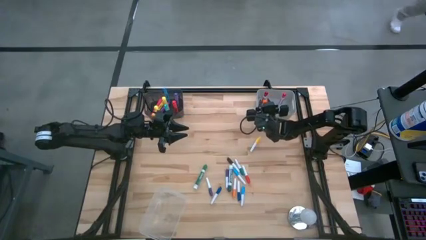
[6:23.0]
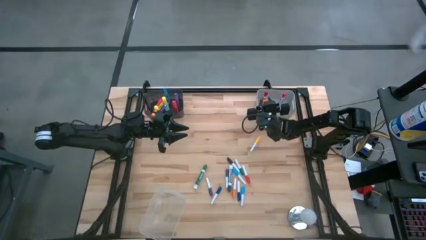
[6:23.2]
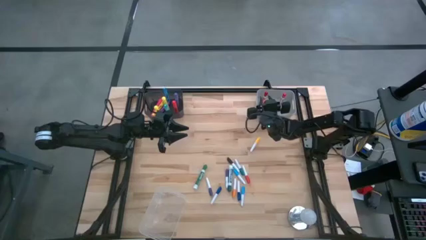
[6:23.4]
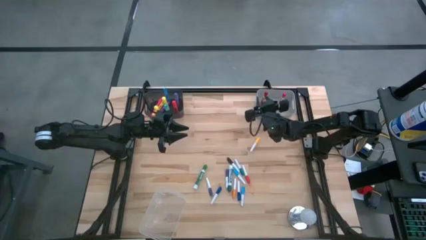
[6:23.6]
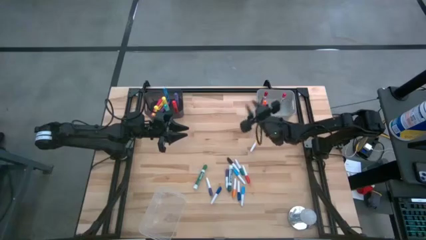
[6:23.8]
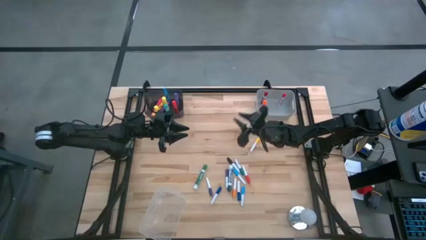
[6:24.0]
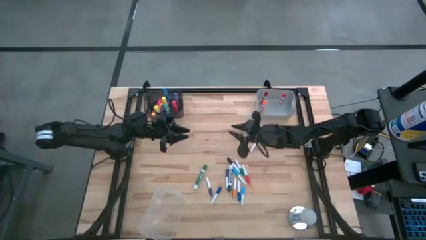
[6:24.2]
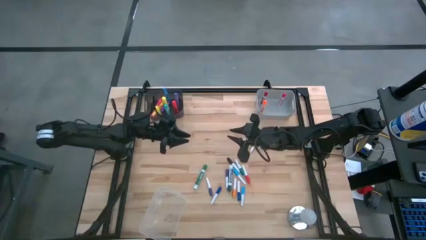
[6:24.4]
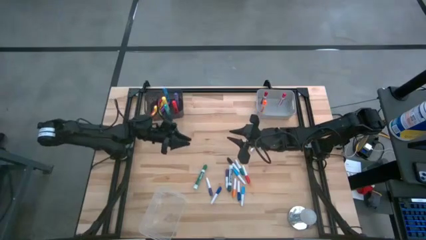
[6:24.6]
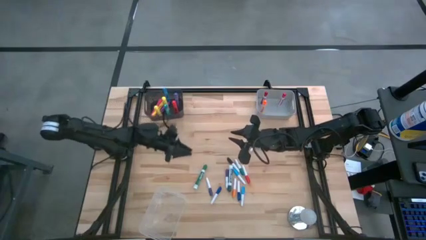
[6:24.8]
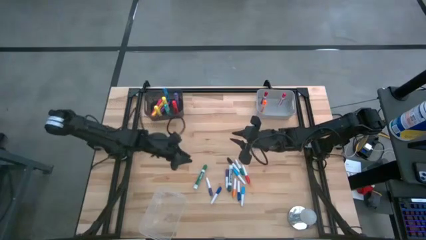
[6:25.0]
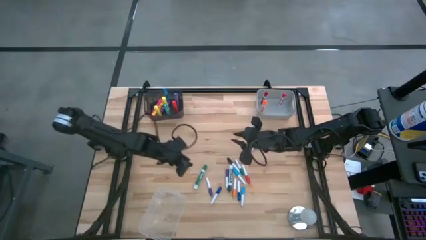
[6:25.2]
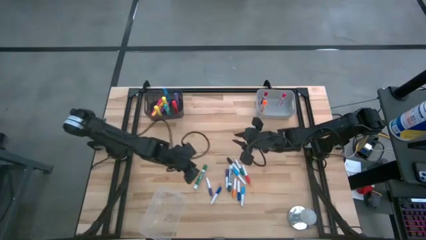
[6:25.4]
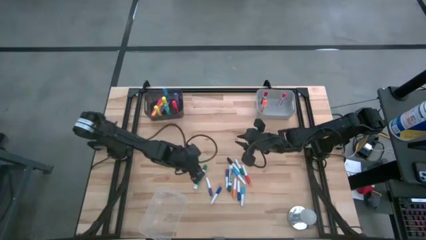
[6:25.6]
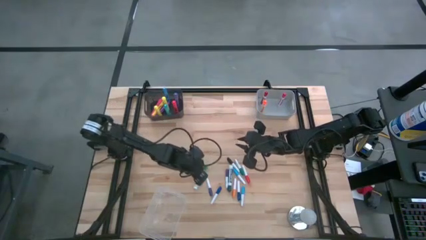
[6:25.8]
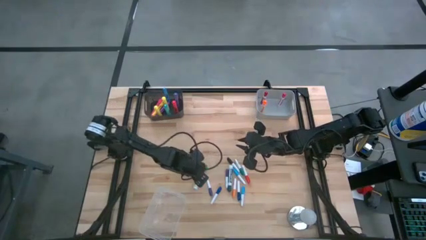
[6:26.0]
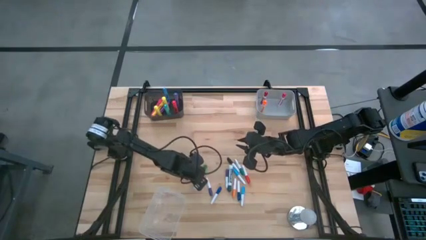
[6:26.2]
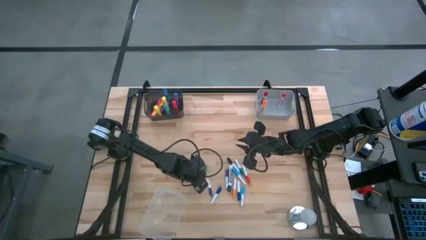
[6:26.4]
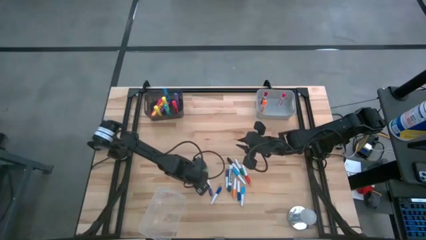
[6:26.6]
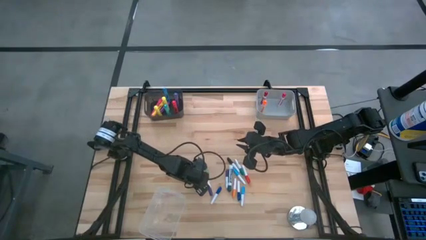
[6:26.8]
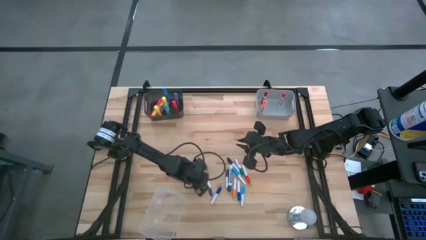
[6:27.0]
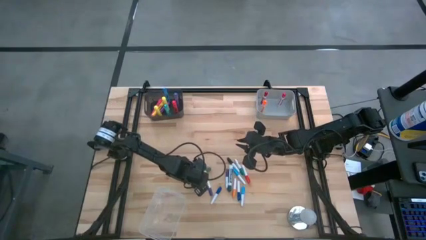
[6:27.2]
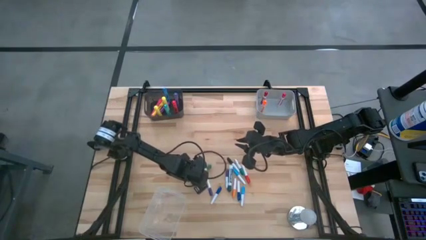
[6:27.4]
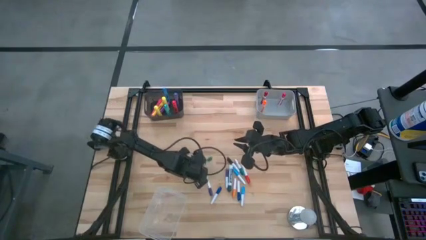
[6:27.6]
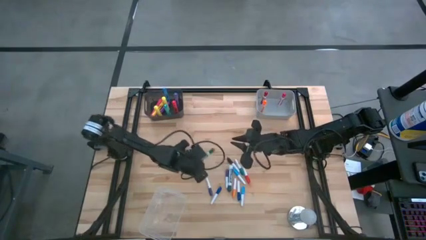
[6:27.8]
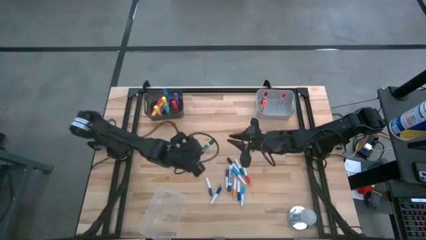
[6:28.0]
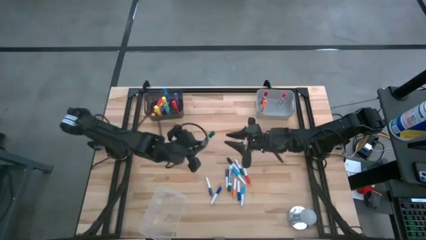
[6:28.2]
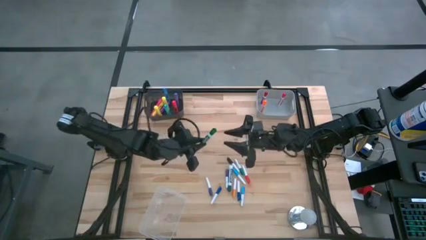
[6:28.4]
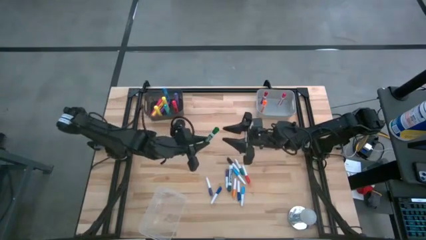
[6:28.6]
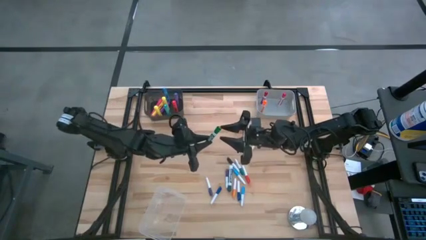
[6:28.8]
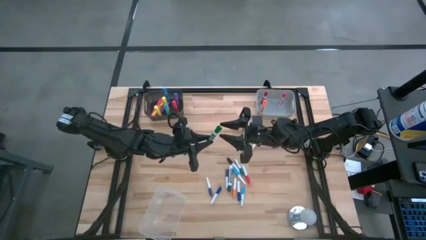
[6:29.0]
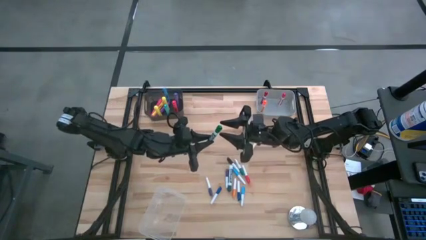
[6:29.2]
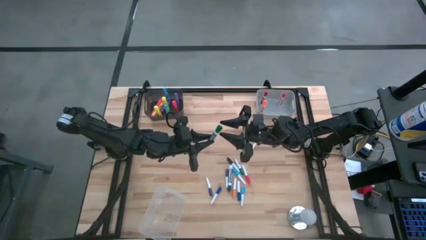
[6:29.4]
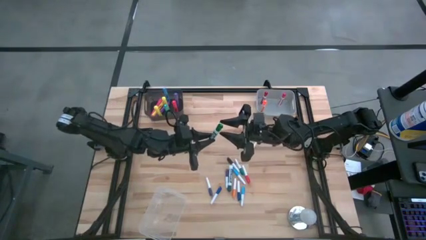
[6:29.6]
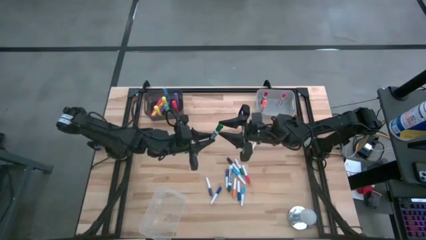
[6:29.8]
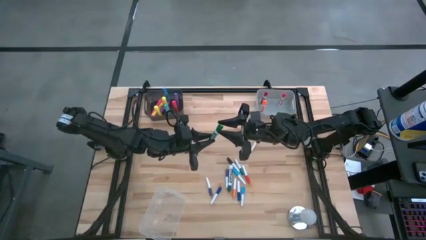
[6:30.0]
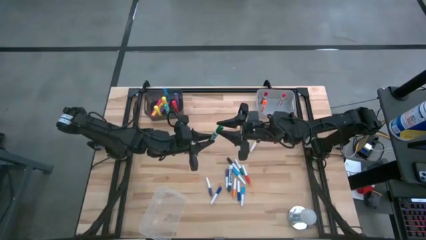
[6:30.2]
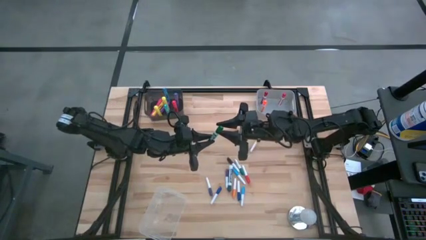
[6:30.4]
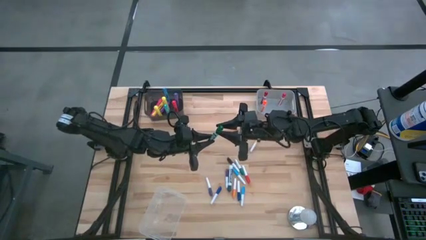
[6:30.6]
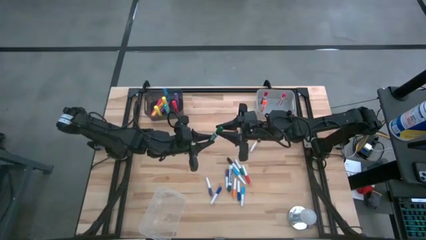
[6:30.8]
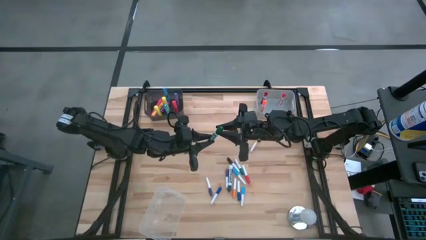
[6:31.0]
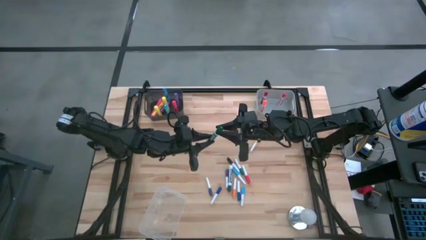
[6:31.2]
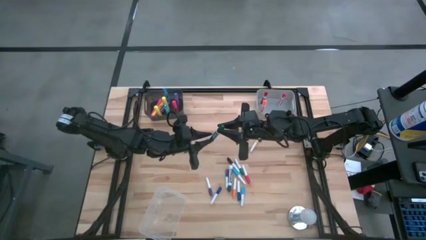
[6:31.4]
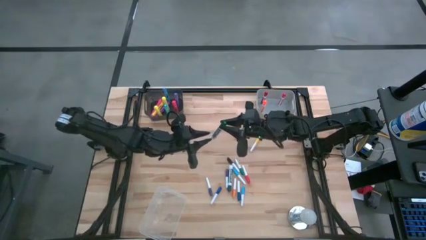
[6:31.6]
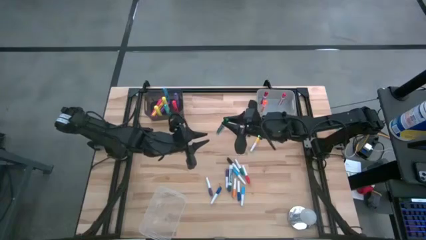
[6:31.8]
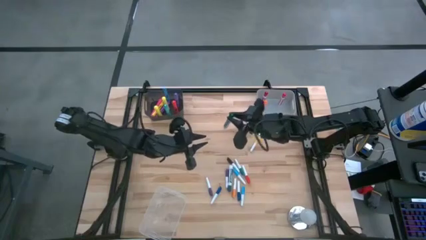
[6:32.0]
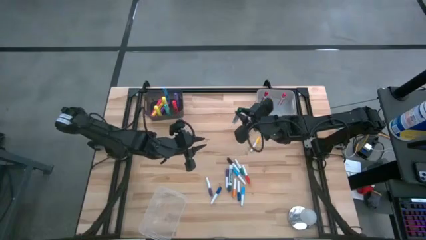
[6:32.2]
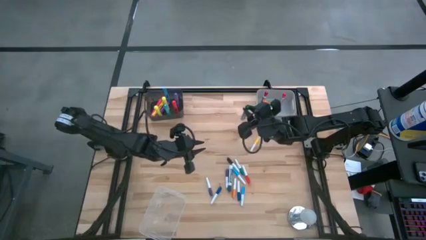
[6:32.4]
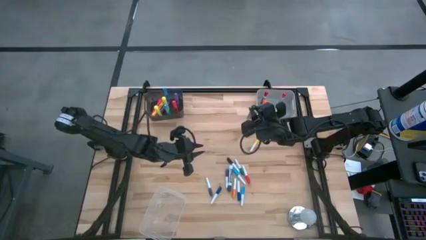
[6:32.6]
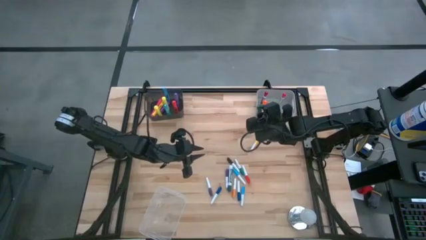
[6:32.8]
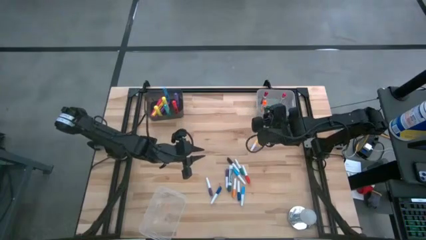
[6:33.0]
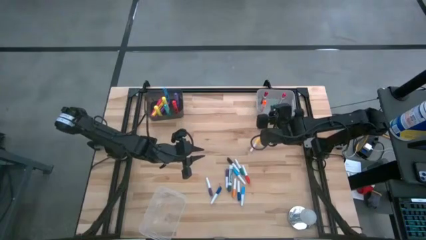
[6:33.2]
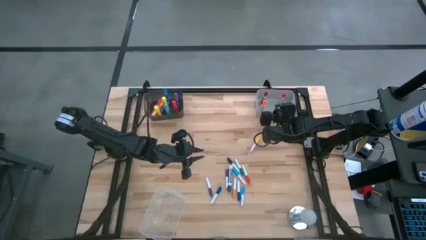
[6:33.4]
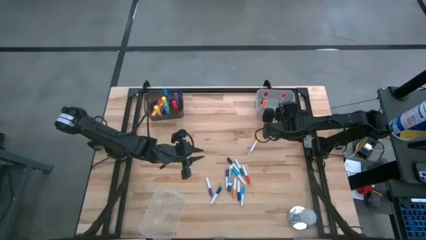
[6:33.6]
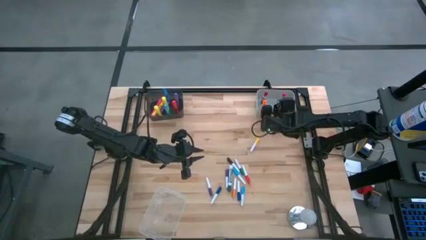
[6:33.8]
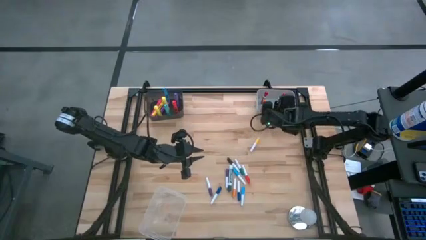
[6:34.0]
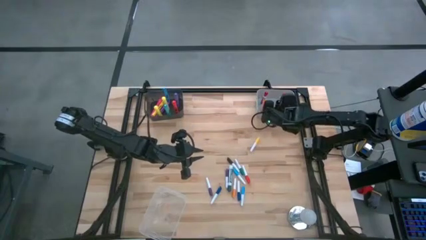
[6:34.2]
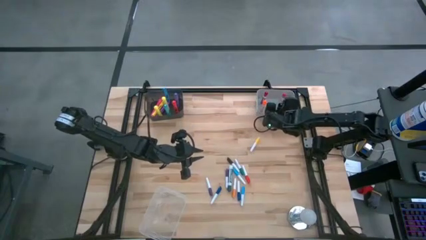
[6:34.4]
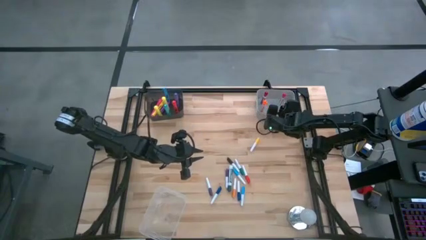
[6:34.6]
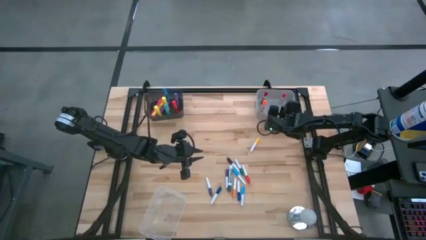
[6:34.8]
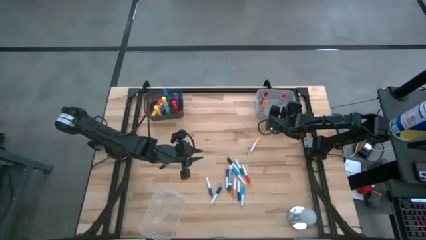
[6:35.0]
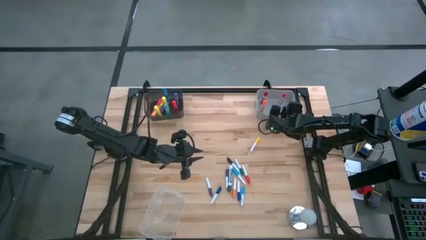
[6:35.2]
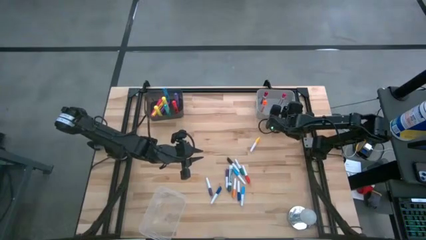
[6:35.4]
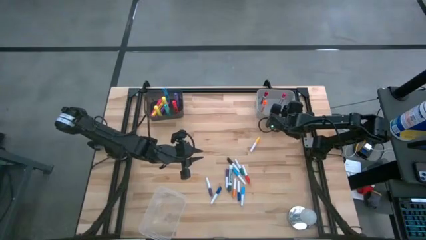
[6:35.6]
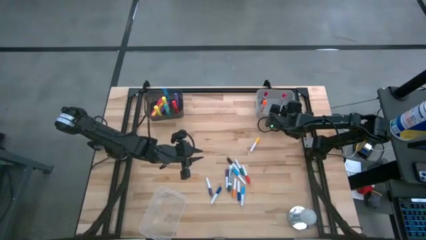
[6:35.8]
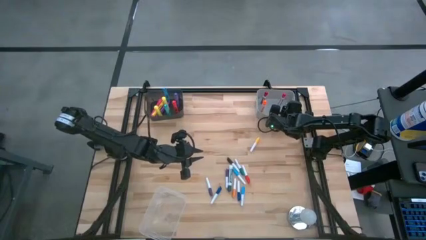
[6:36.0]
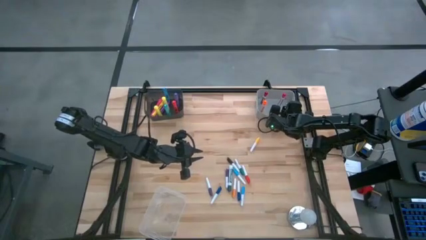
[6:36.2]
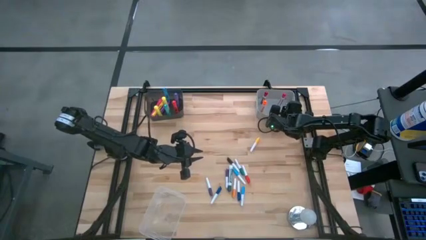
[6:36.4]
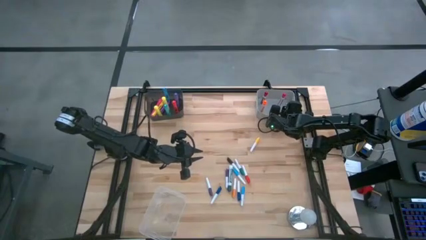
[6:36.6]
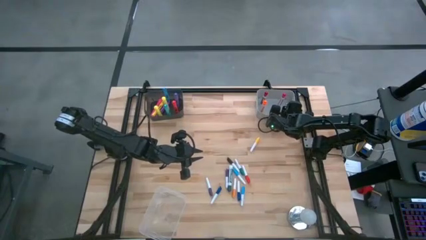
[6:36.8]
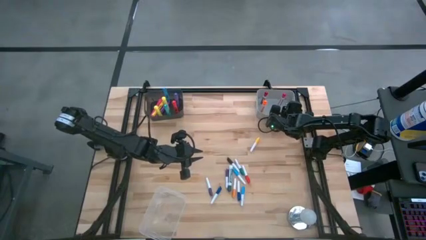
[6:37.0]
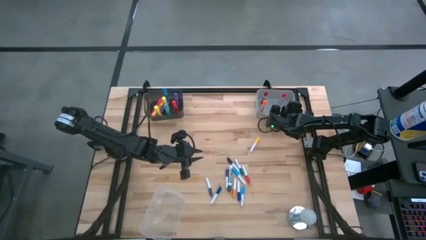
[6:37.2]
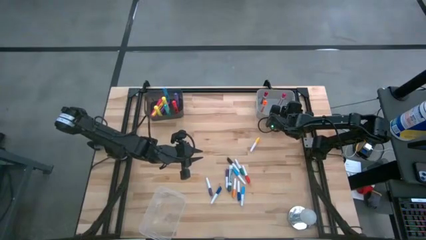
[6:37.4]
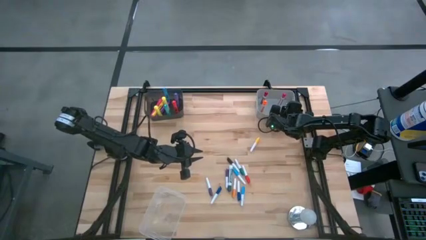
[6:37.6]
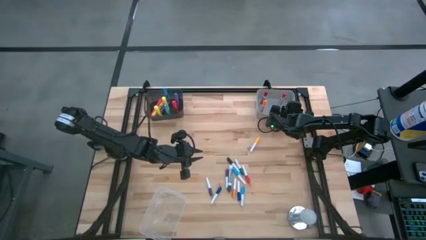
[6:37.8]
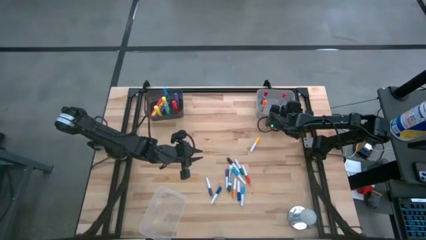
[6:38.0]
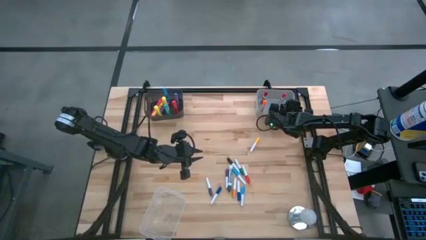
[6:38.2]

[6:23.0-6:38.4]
Task: Pick & Place Markers
Put the green marker pen into the gray bin
